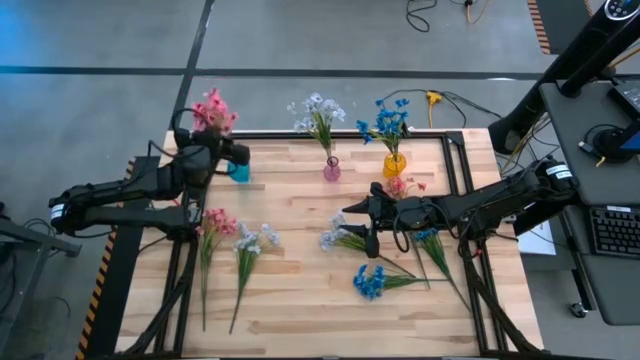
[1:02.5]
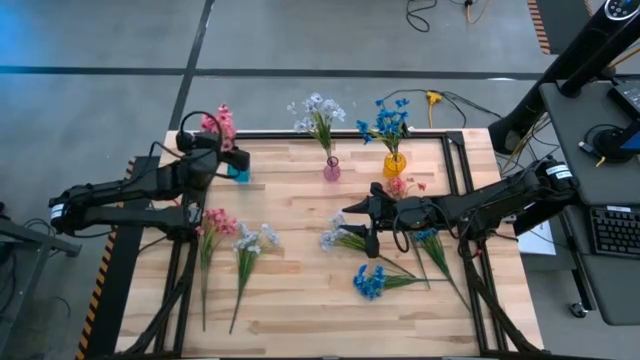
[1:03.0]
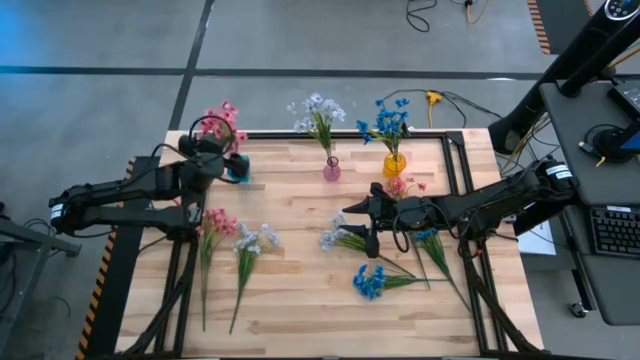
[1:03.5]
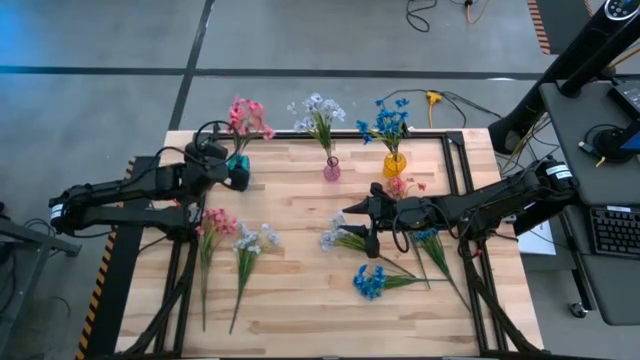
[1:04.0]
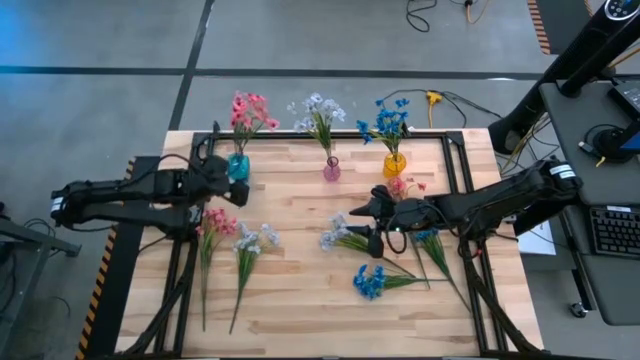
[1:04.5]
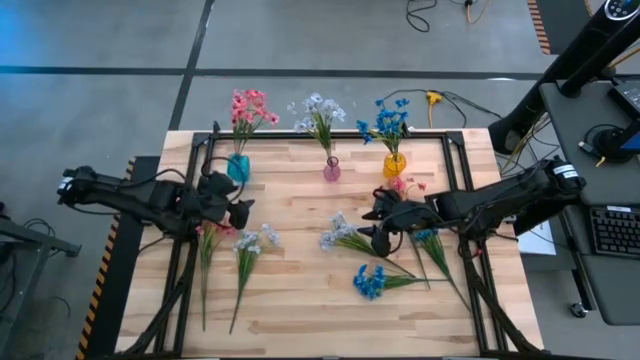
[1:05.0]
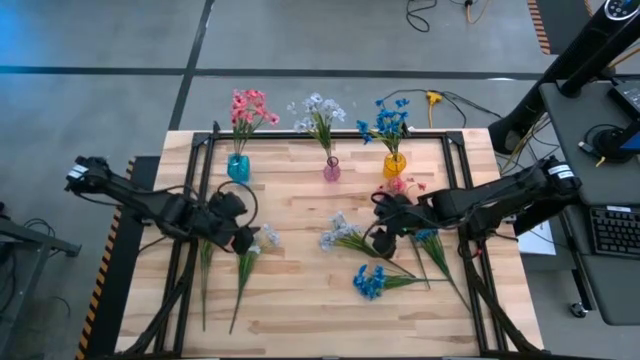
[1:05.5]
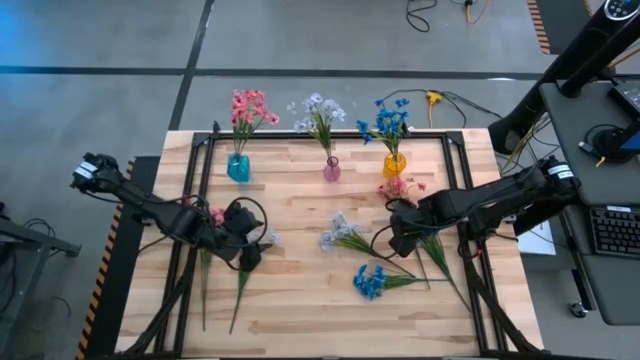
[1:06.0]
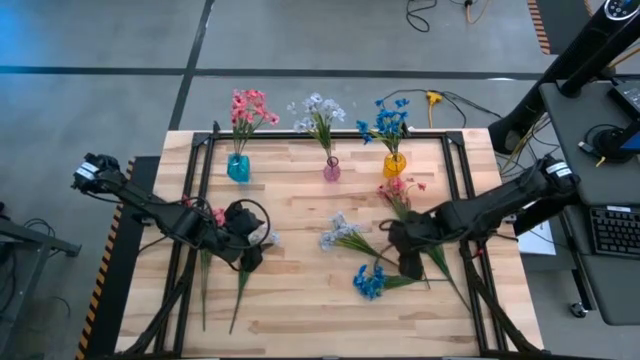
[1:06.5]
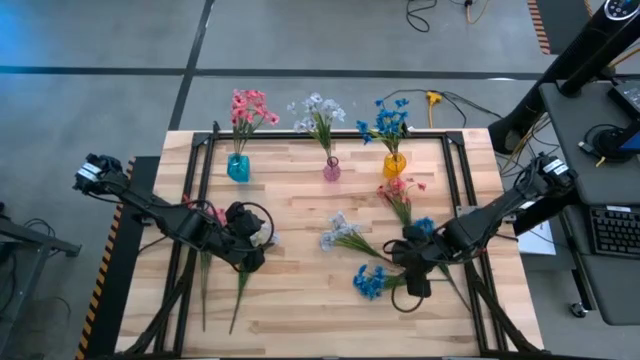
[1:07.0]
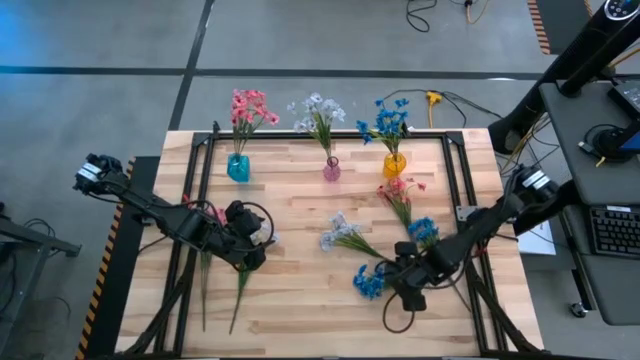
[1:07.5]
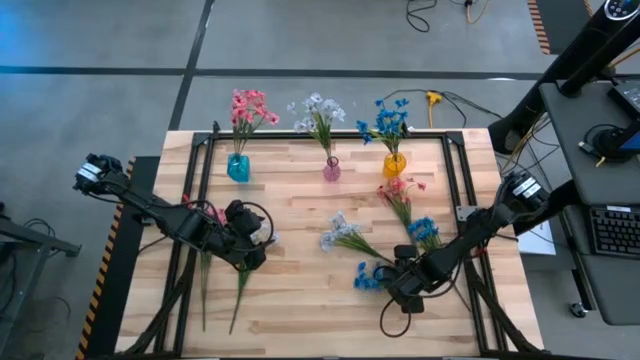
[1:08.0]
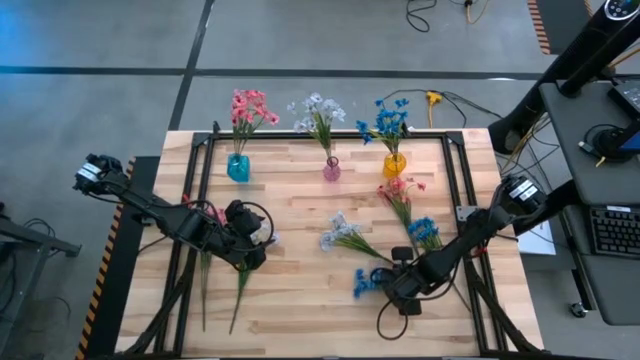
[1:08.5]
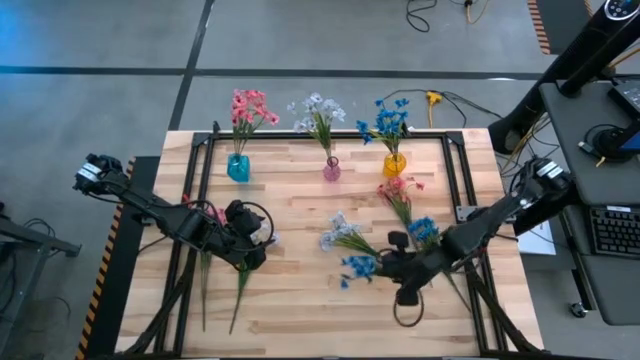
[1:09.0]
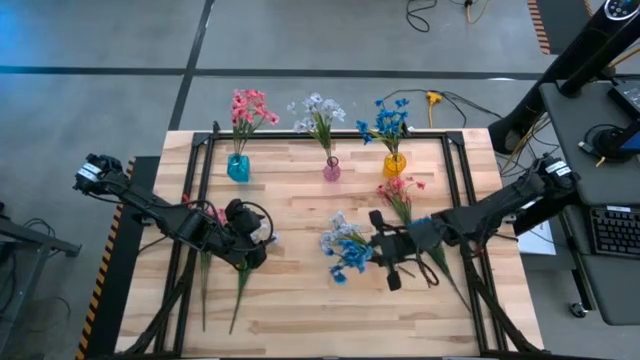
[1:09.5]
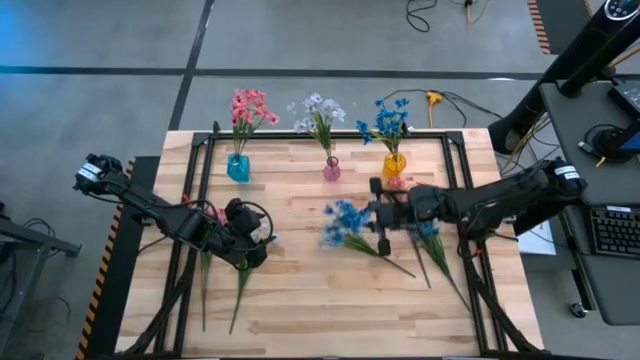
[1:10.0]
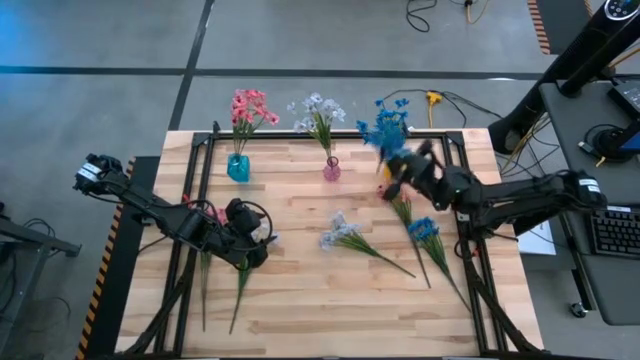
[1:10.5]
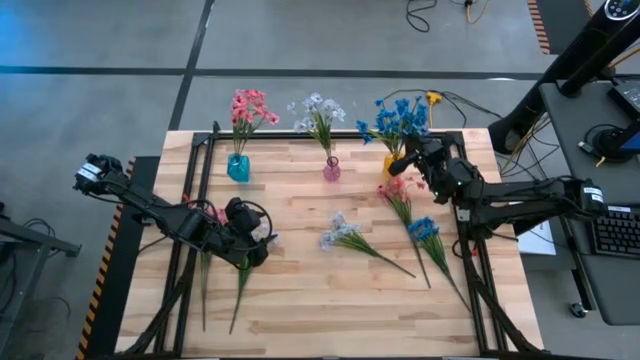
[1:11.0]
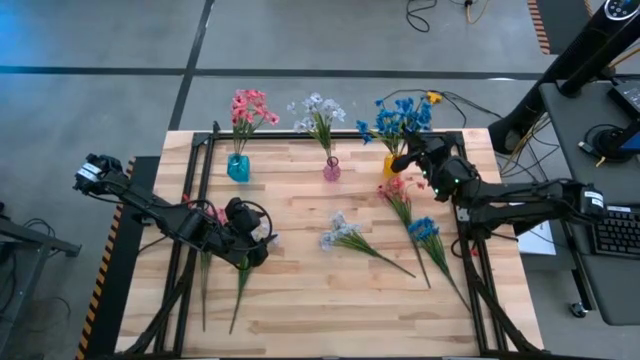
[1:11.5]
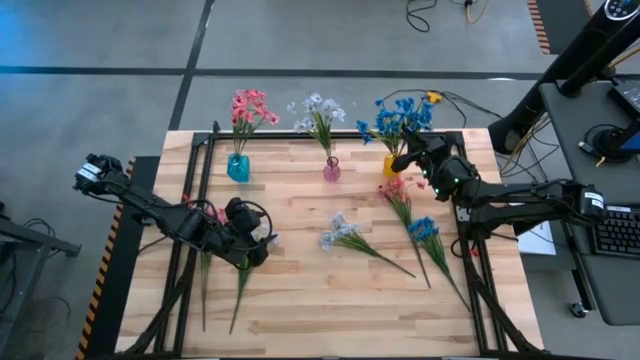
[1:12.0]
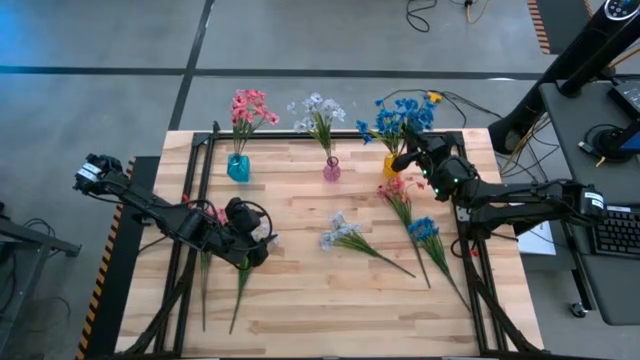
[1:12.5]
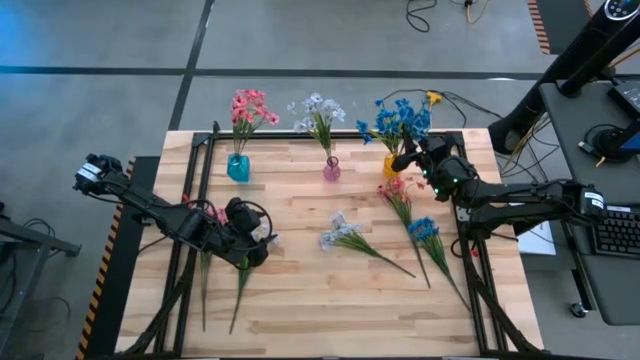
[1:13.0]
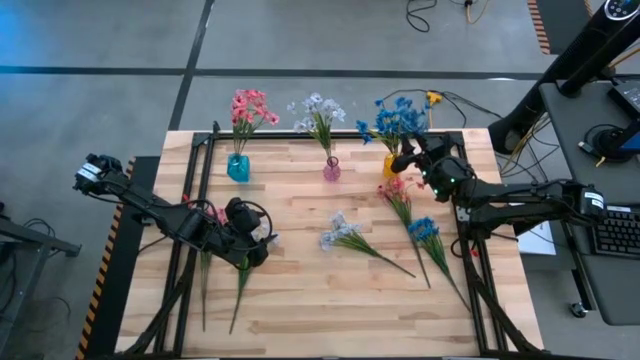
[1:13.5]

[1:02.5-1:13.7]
Task: Sort flowers into vase by color
Put the bottom blue flowers into the yellow vase

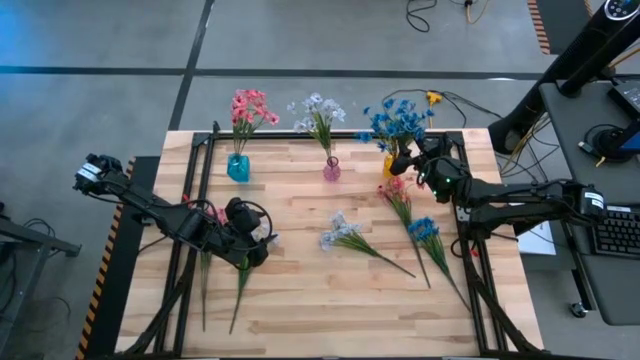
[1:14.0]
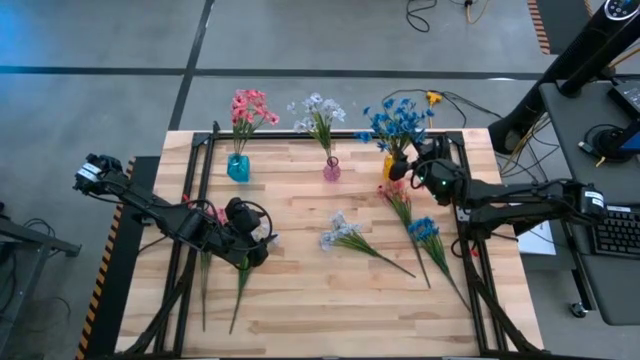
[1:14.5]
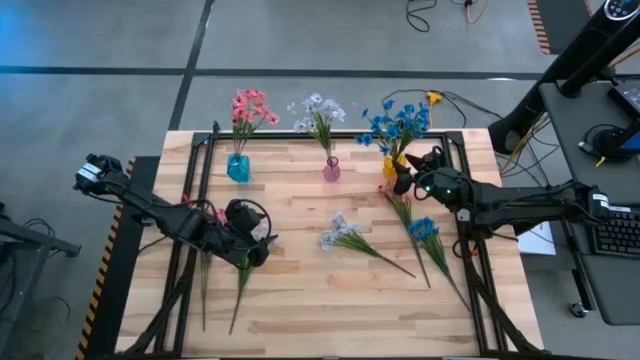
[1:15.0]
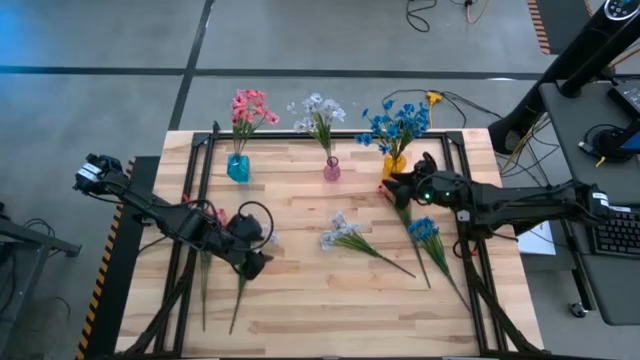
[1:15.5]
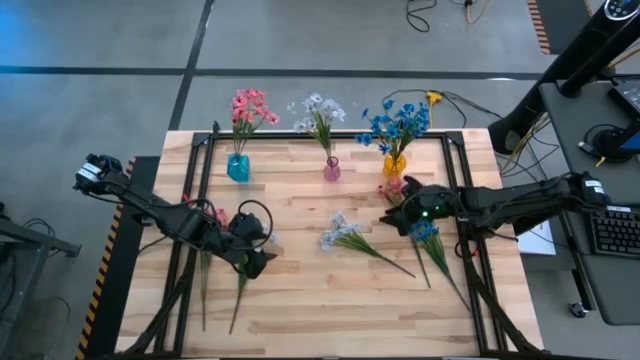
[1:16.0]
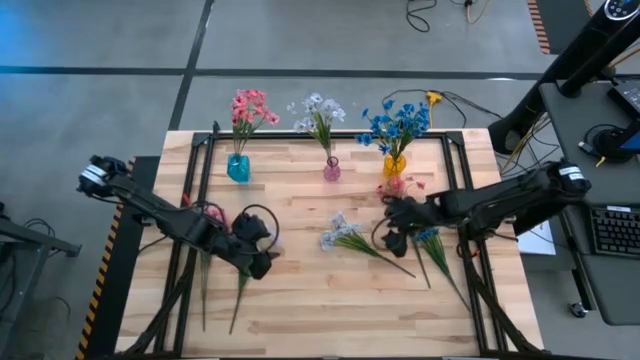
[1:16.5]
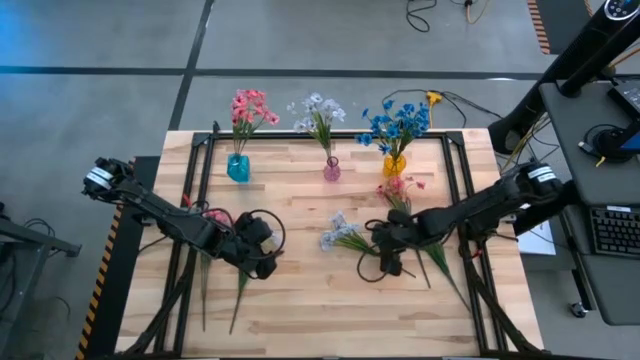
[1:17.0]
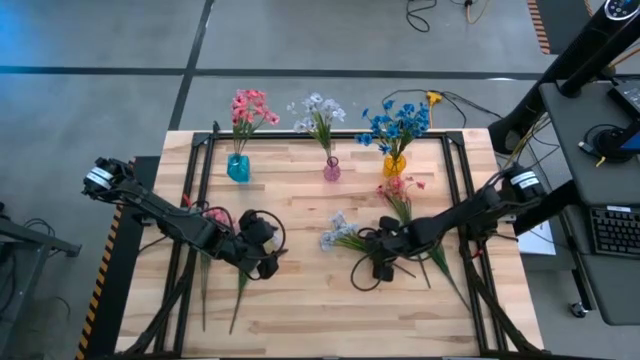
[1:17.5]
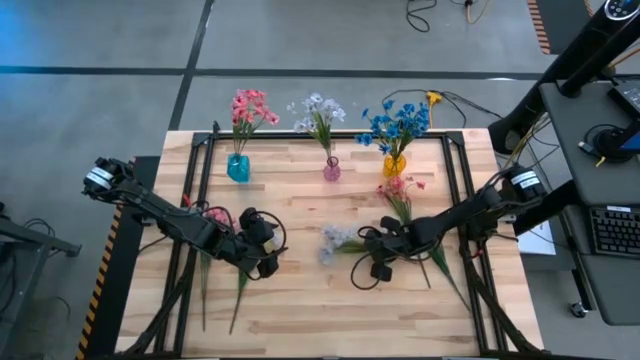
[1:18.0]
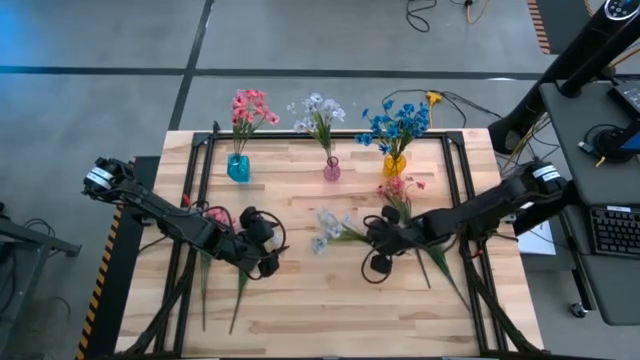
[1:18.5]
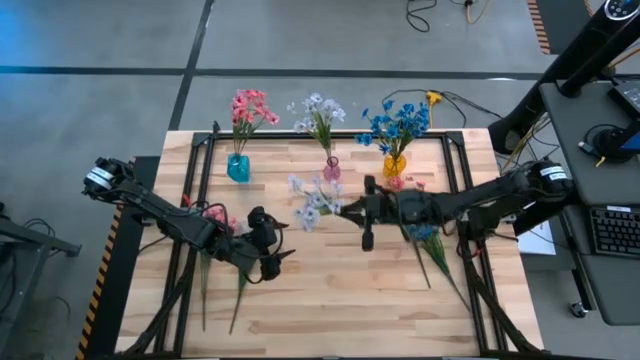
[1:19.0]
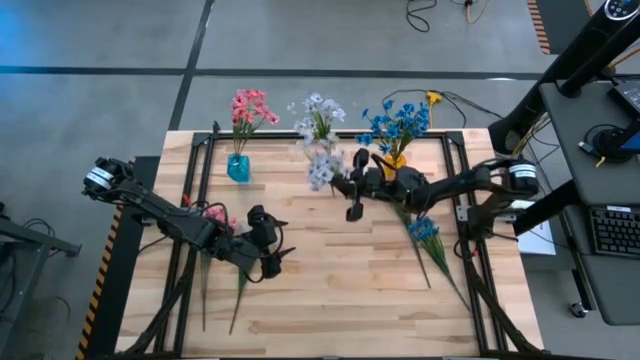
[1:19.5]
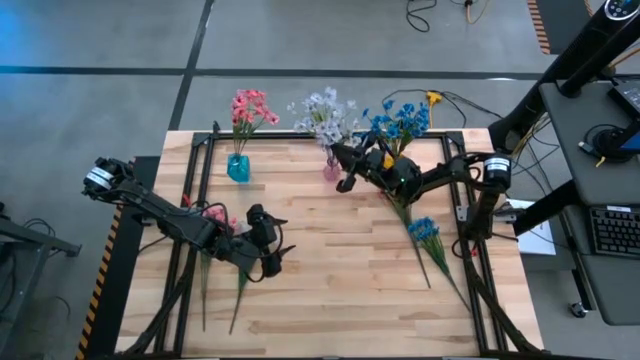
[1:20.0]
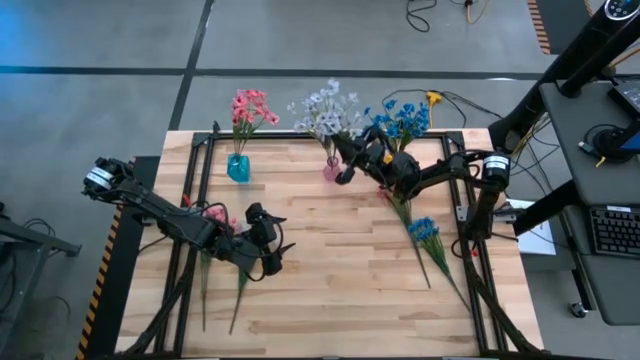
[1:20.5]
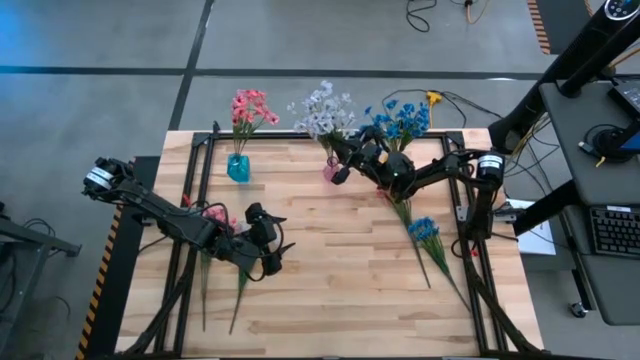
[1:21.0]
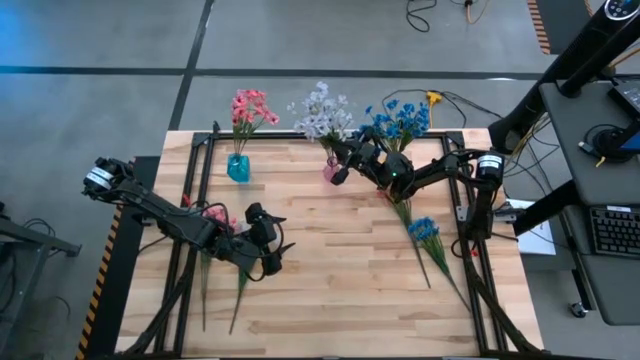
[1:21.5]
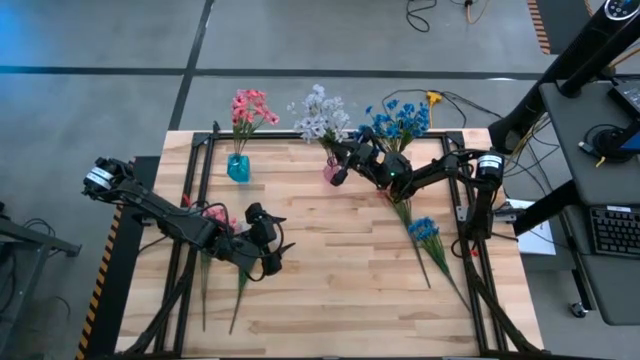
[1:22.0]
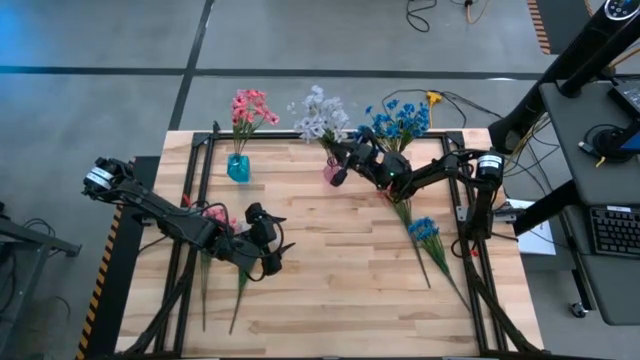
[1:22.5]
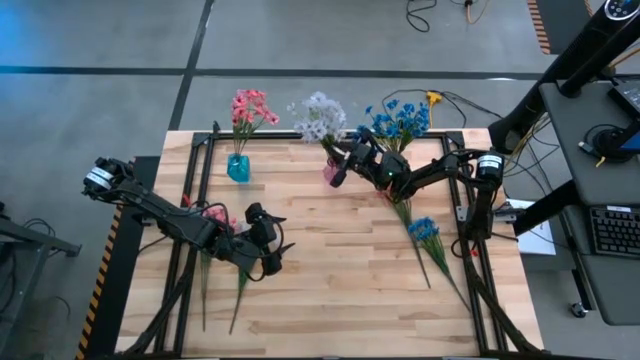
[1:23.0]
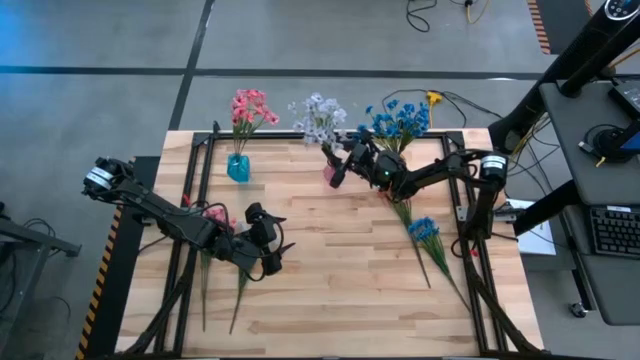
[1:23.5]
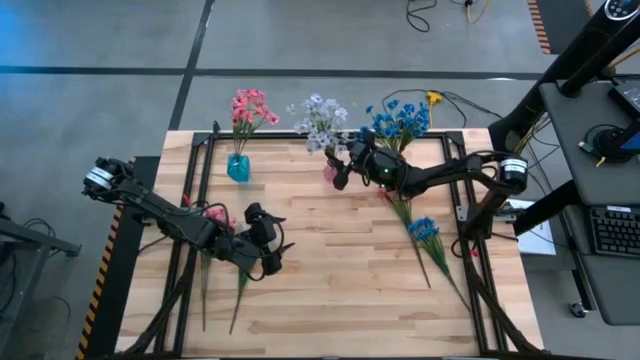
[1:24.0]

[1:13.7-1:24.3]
Put the right white flowers into the pink vase
